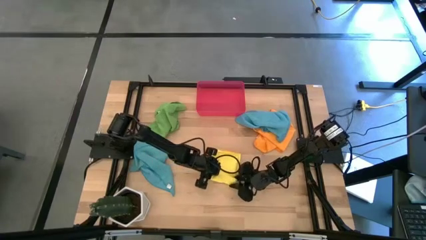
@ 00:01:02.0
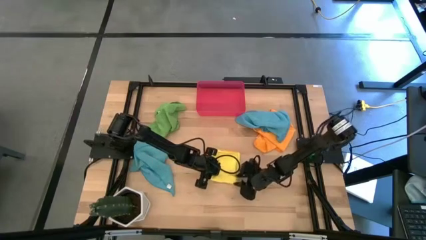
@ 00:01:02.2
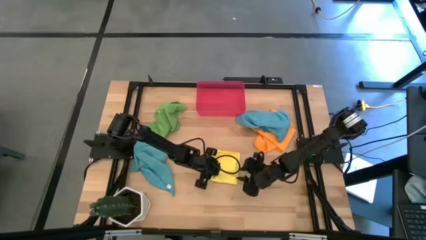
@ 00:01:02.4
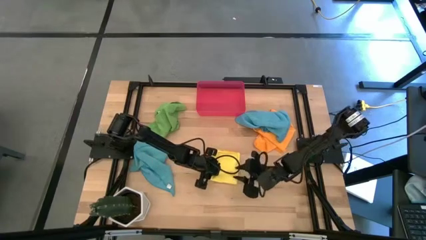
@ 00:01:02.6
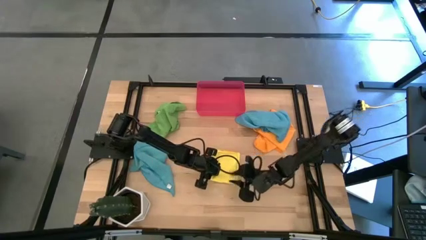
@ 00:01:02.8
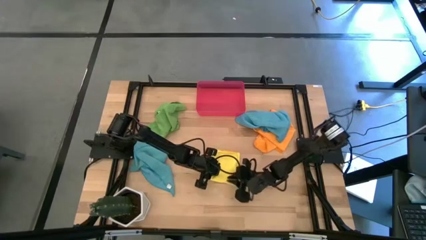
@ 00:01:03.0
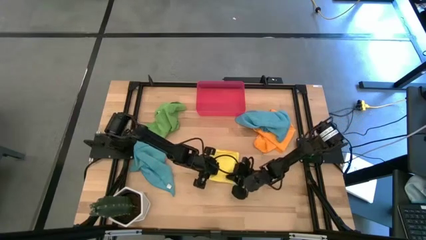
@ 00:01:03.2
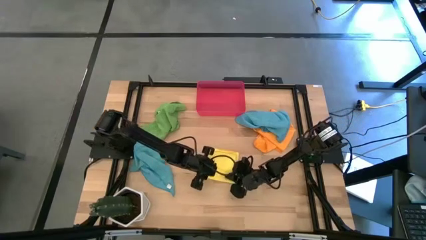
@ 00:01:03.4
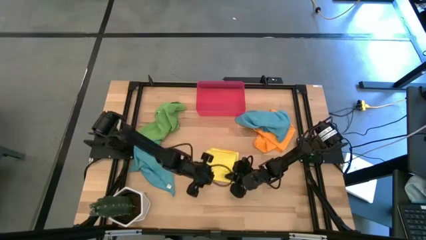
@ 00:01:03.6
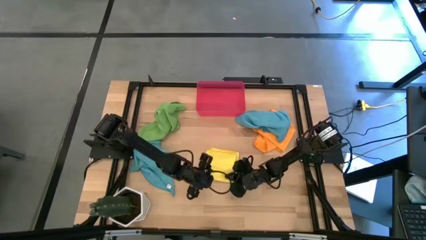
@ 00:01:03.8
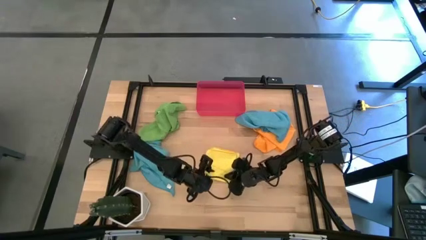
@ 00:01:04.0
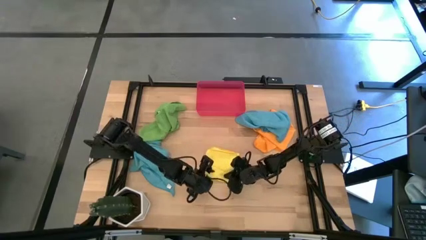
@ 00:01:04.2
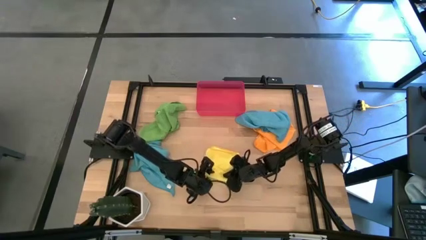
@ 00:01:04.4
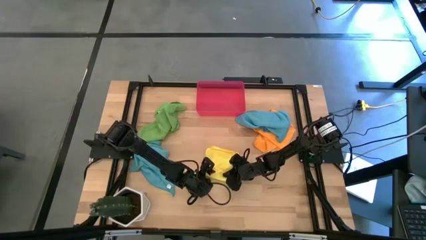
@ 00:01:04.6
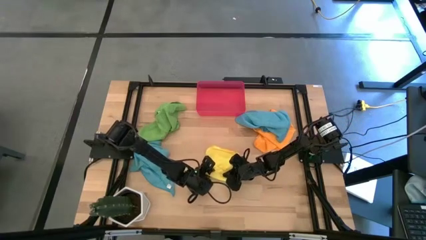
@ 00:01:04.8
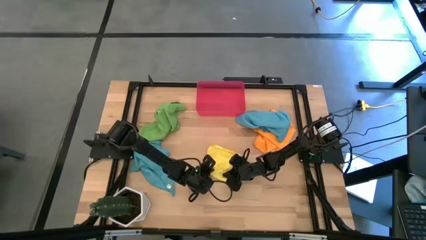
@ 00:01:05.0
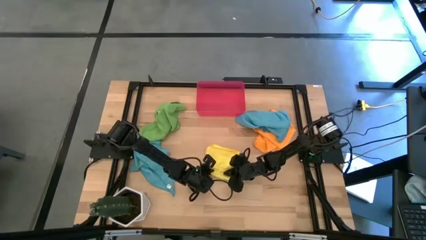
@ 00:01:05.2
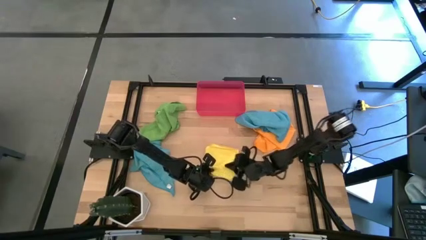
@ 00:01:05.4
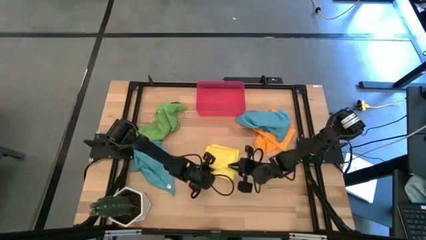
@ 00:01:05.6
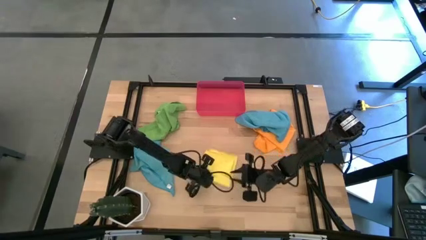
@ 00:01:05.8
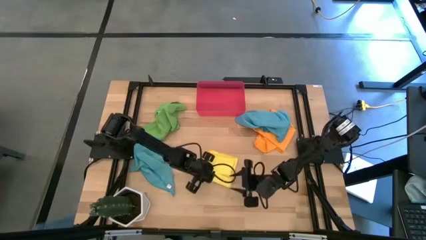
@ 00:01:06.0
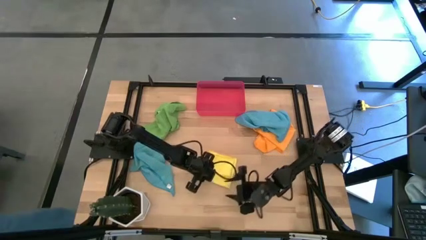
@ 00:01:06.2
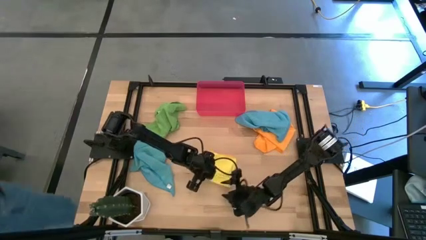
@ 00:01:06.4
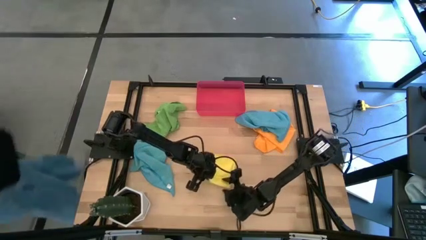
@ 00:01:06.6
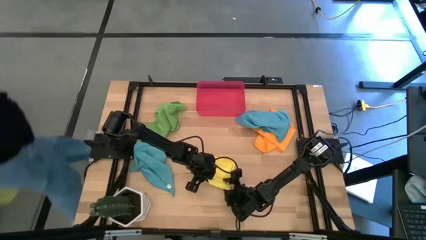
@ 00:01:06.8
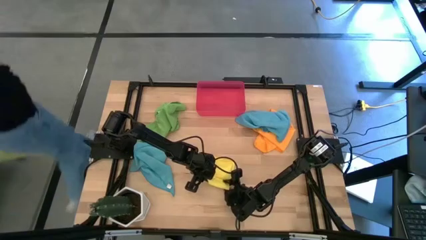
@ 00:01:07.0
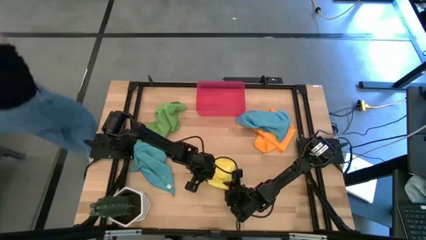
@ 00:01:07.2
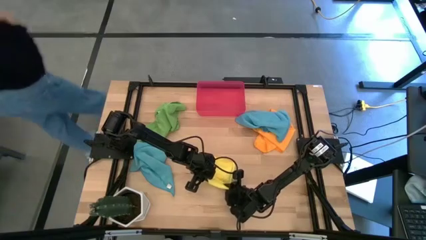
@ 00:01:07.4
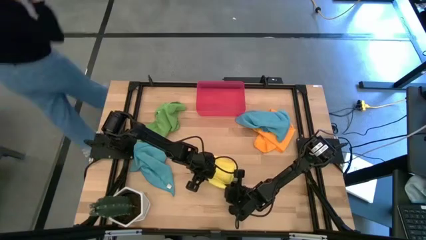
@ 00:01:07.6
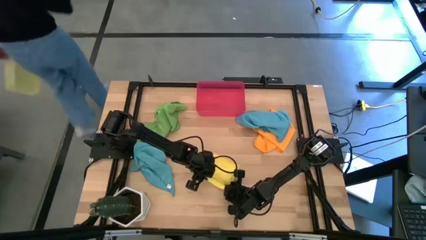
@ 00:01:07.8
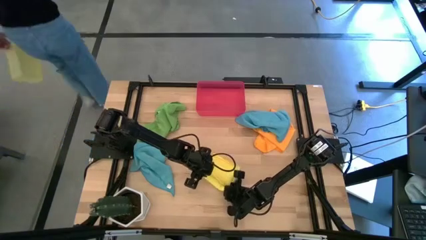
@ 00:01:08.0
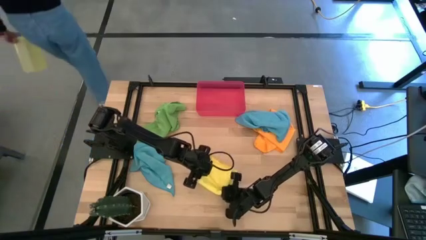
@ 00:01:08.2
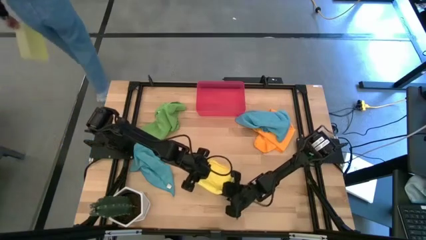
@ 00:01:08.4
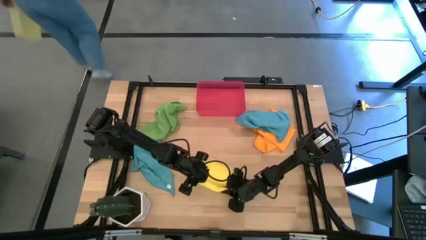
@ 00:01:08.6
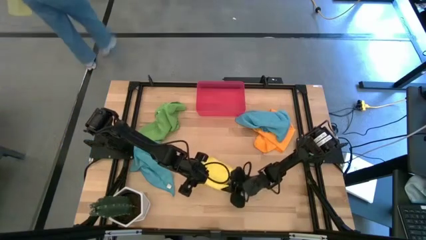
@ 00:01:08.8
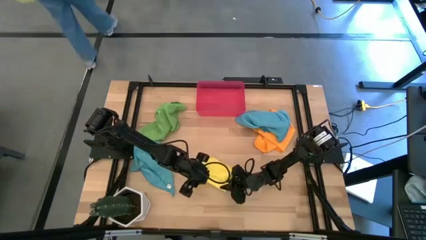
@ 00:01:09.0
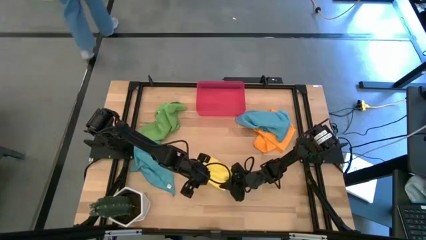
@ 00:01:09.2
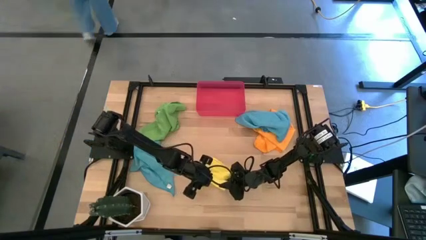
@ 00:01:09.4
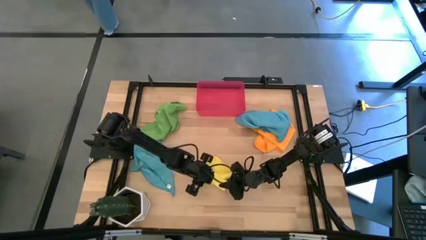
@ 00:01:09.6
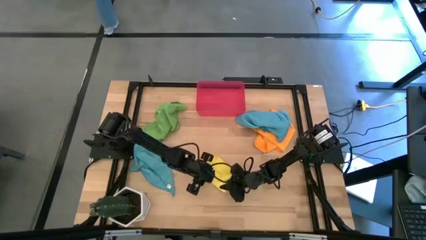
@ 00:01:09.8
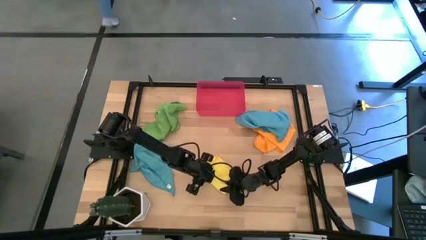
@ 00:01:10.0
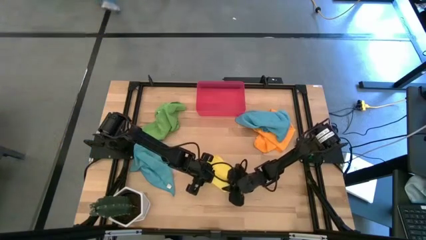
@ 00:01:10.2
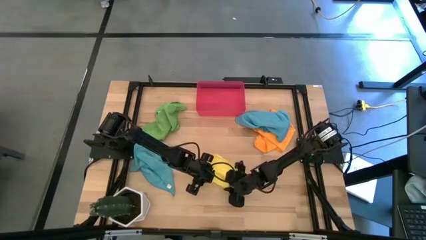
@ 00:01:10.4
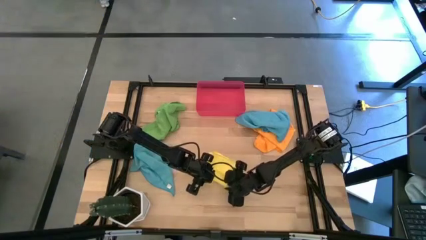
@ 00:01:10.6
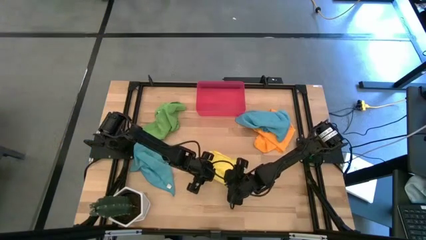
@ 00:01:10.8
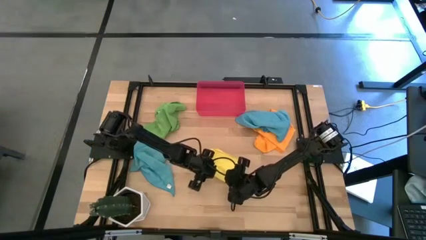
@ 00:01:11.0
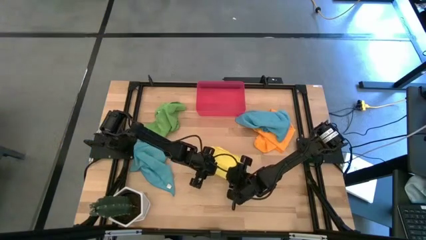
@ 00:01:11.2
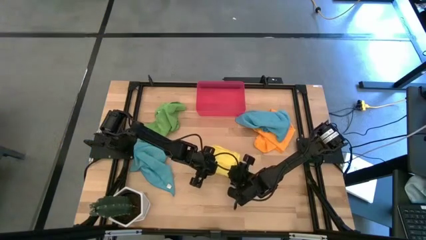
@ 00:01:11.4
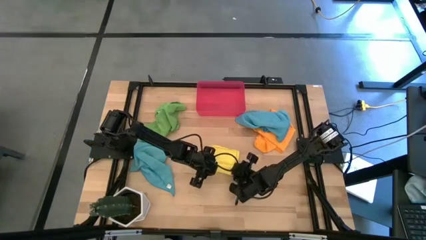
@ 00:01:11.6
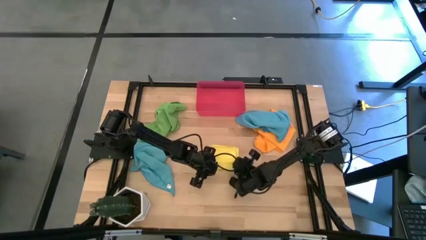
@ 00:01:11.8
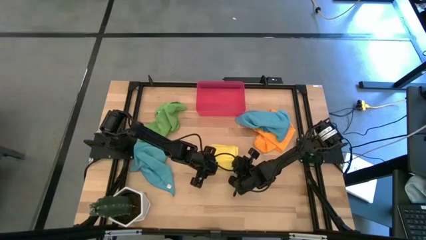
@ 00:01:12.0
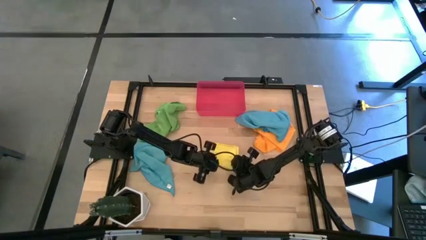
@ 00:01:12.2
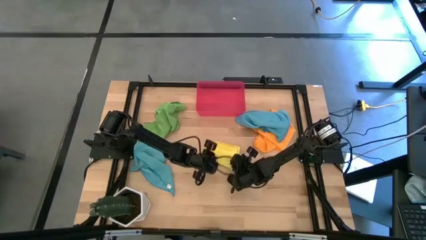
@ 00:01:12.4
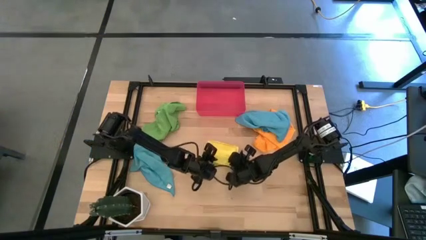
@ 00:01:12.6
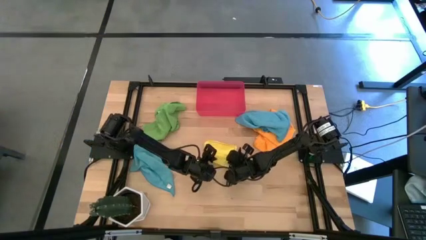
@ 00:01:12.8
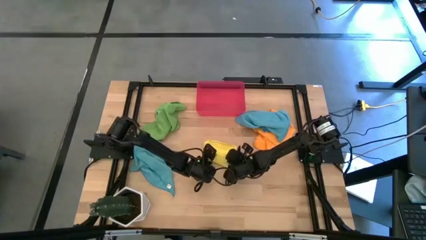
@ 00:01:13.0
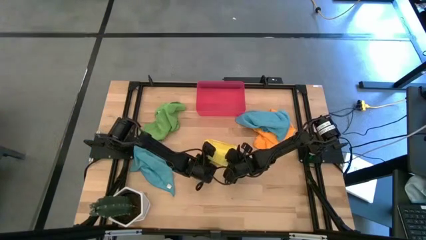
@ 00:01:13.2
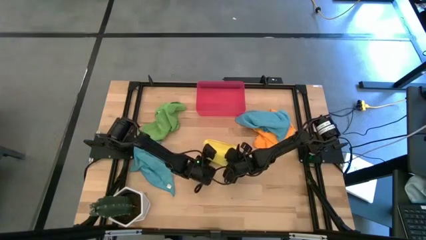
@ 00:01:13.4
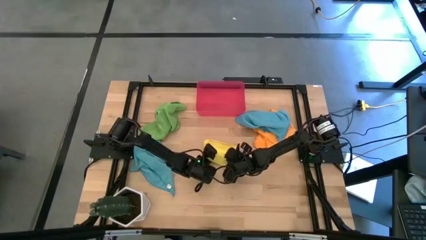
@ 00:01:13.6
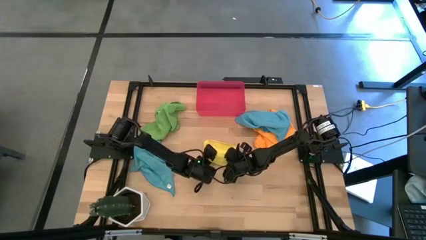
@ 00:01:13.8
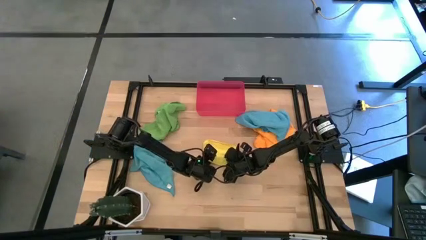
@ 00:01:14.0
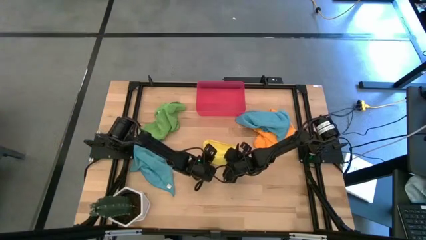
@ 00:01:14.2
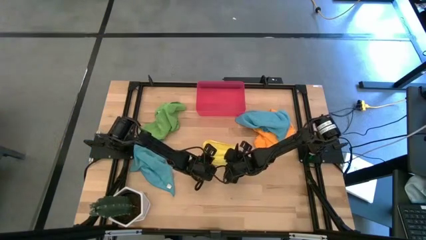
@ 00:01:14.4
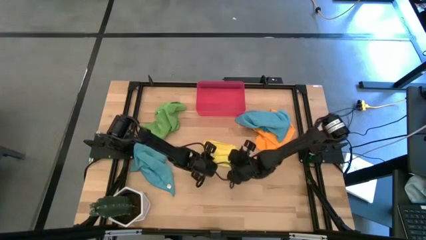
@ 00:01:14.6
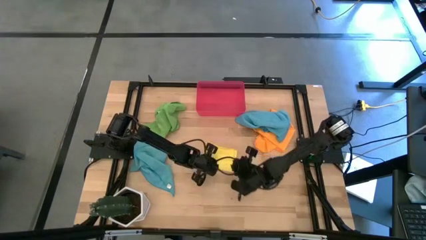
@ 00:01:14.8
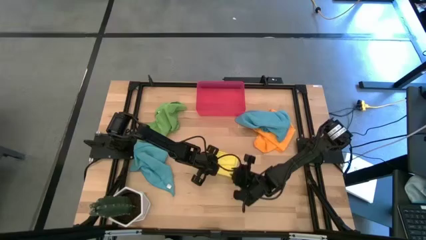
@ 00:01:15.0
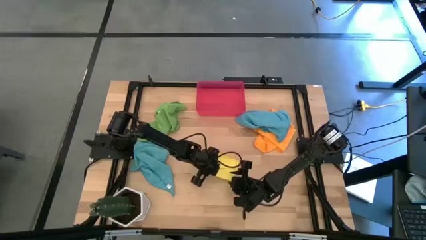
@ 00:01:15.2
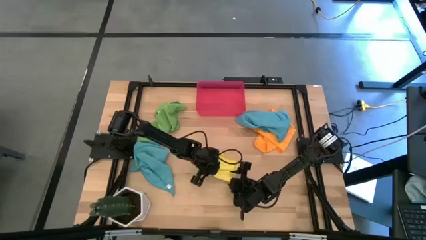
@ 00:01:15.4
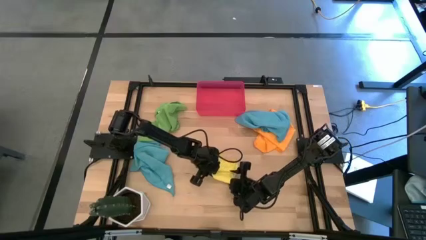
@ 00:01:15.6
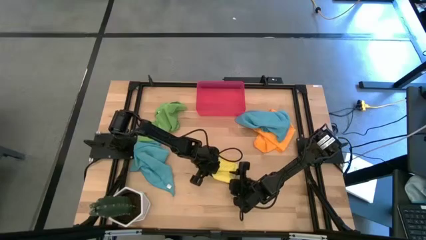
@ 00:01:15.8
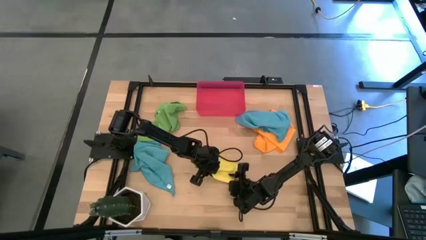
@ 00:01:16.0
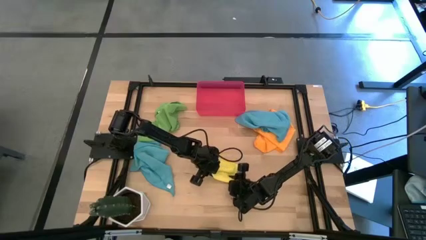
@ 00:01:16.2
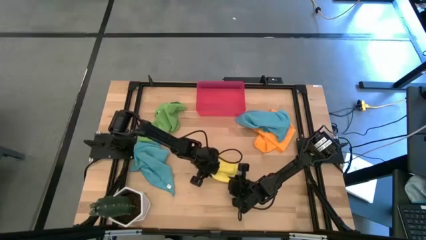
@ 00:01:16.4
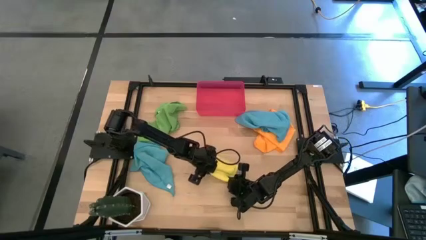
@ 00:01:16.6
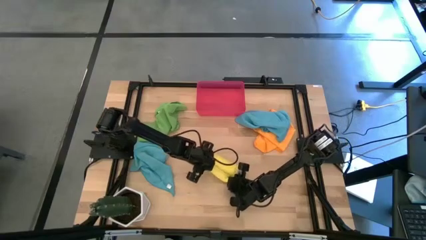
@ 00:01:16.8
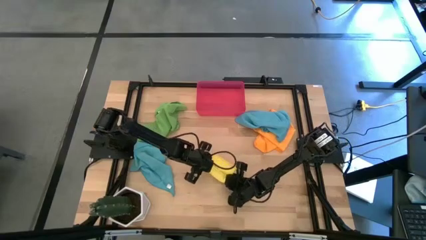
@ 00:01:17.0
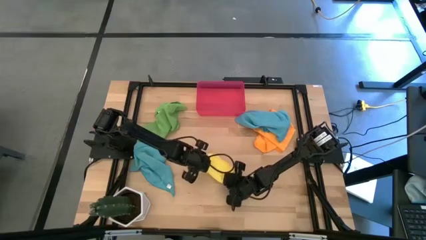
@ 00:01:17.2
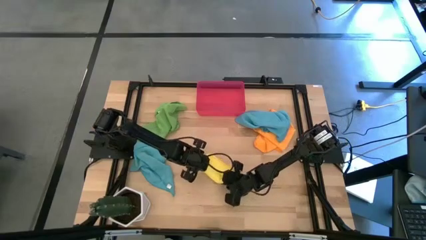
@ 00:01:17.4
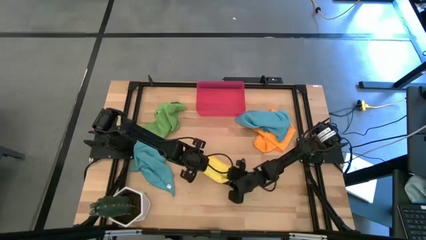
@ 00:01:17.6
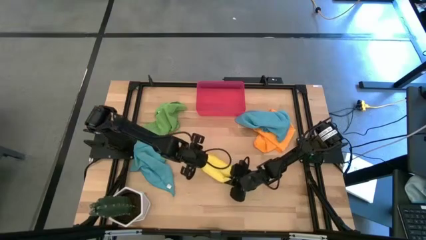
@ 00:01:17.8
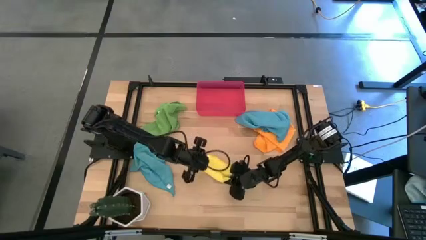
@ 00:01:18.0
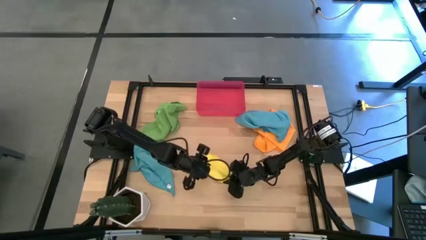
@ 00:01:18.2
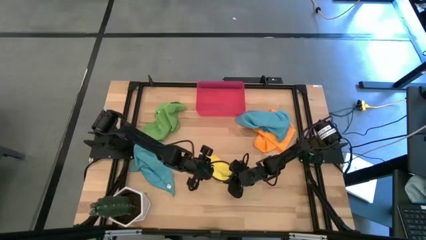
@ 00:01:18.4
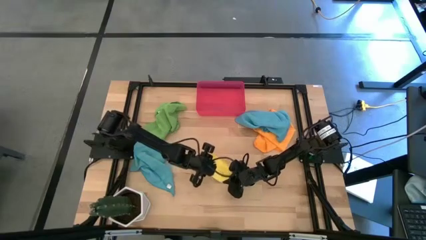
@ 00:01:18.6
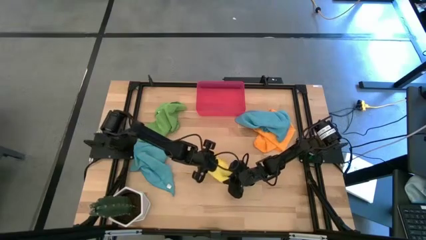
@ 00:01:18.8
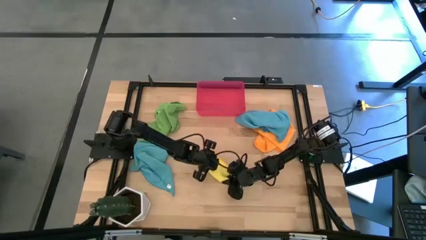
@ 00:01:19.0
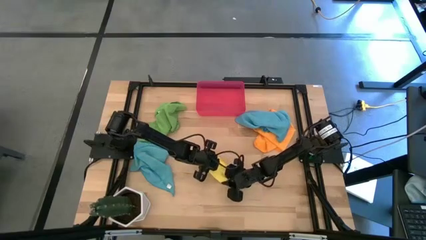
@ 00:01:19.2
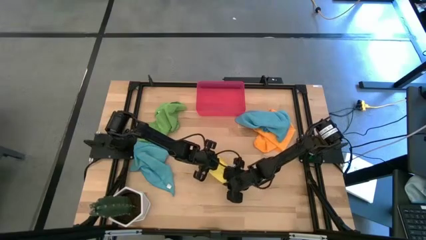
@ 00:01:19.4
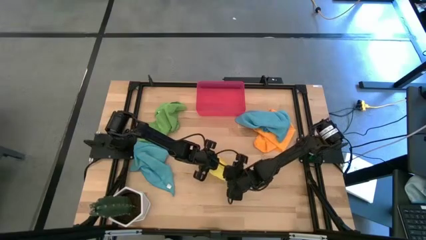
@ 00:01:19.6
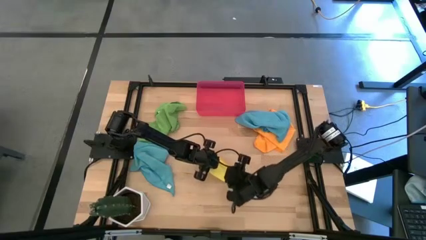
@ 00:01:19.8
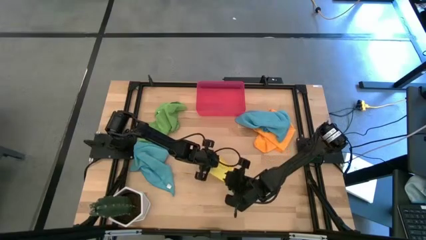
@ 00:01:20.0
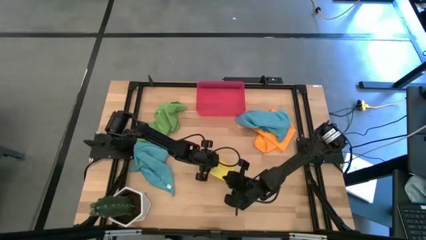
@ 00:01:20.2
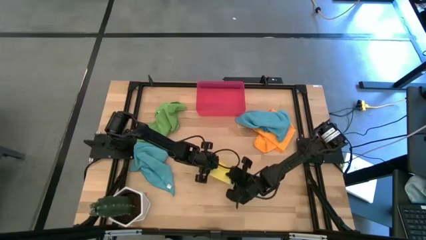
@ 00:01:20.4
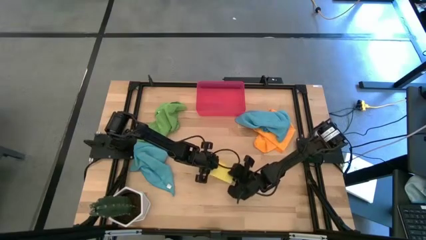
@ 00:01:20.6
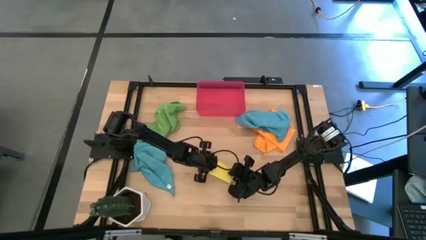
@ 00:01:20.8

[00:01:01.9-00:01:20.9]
Task: Roll microfiber towels into tight, uniform cylinder then place into a basket
Roll the yellow microfiber cloth
